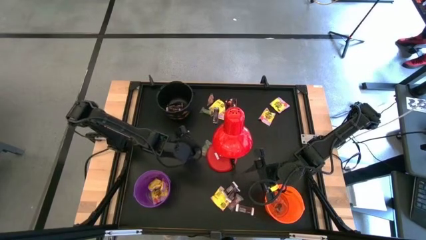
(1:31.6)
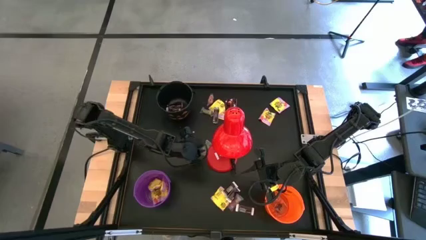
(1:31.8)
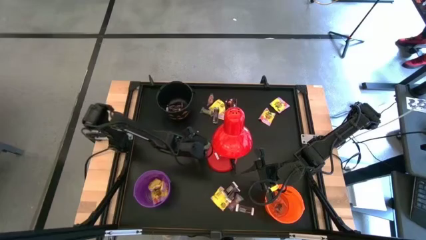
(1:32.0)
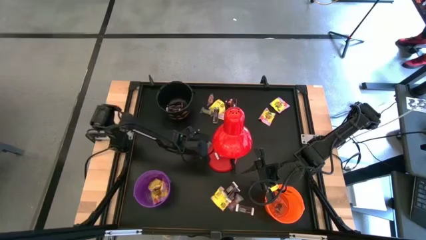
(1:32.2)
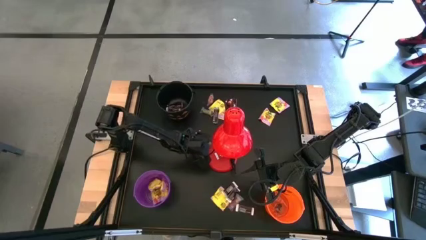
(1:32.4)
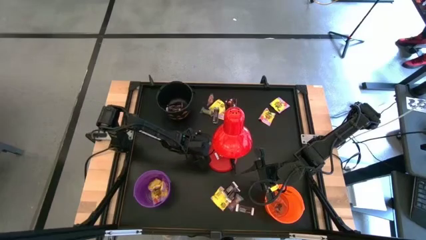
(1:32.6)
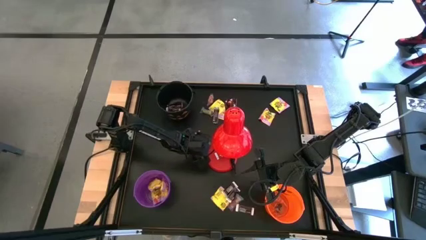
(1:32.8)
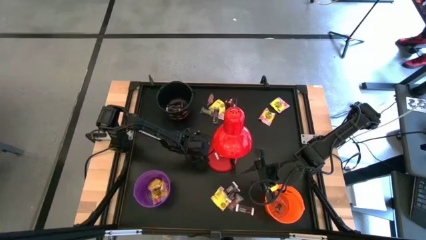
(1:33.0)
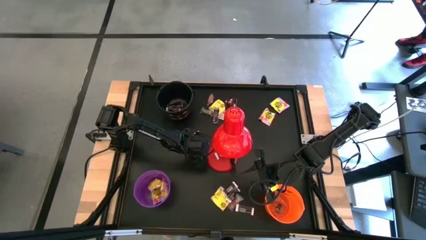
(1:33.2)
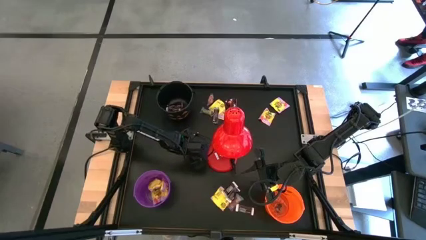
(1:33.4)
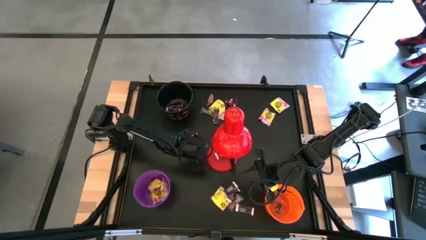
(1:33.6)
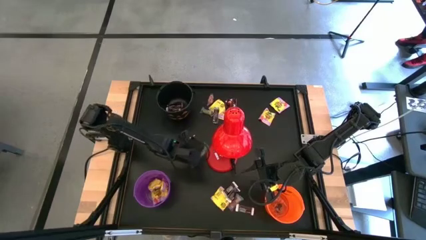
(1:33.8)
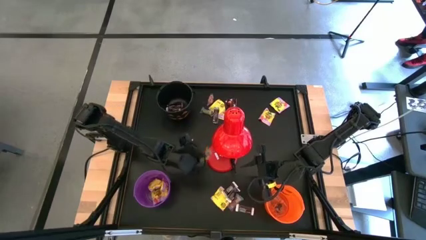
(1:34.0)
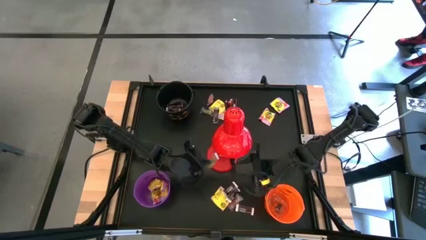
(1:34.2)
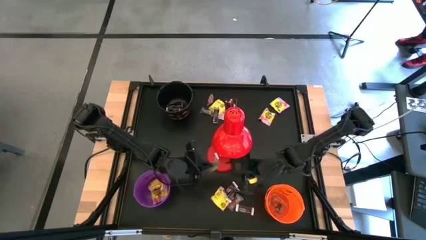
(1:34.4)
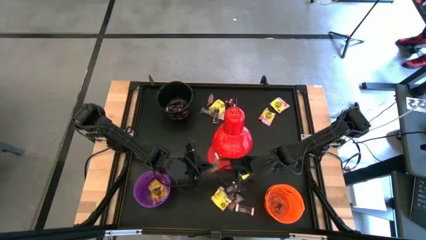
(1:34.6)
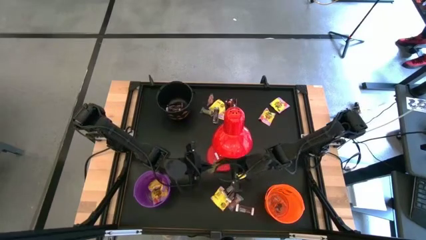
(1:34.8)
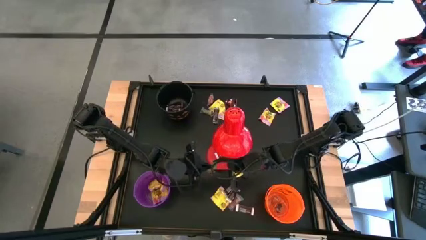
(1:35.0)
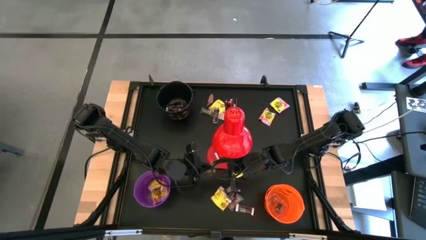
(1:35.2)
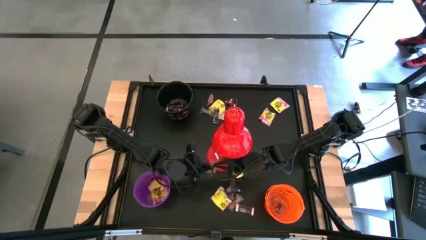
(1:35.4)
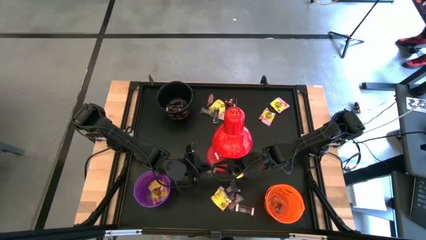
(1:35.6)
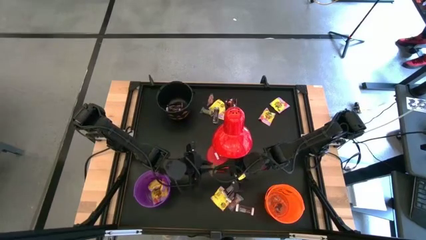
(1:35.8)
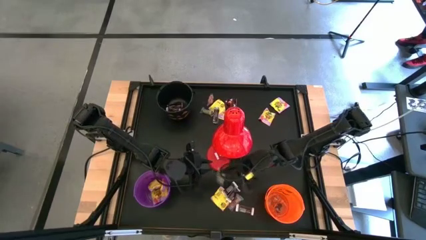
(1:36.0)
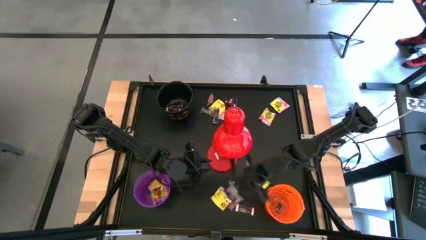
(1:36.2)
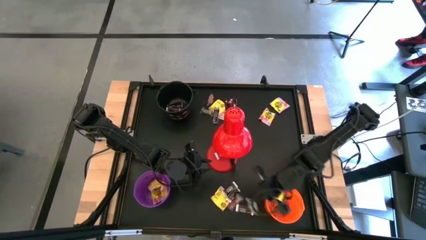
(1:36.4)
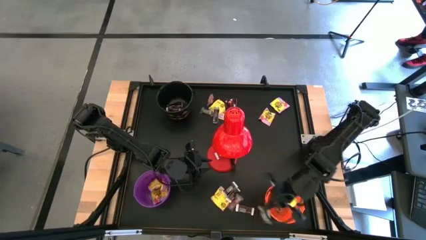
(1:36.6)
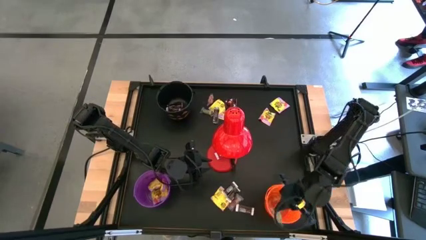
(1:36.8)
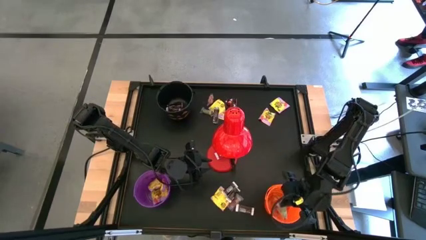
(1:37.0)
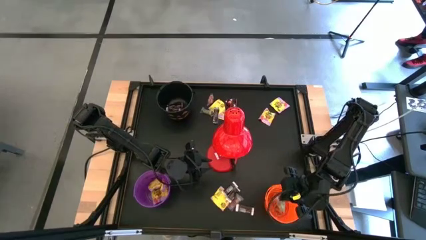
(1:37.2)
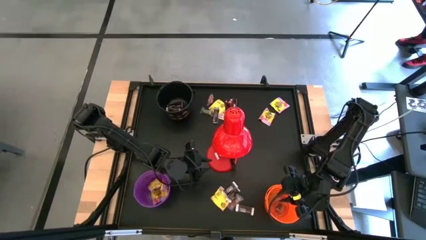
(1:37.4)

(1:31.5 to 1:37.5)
Task: Organize candy in baskets
Put the green gummy into the orange bucket
